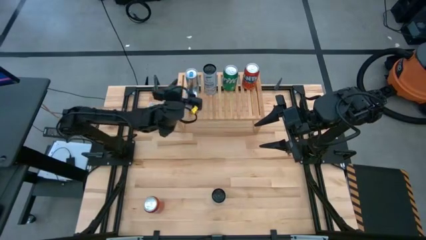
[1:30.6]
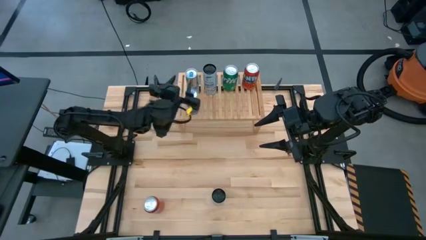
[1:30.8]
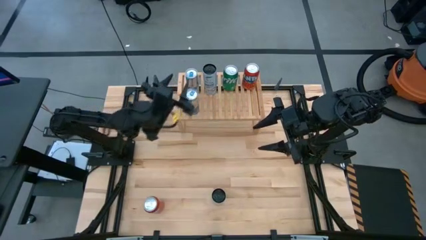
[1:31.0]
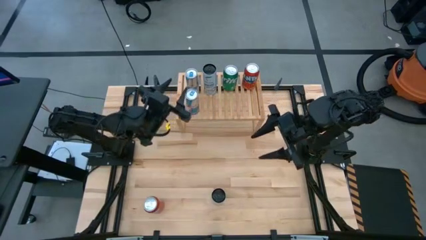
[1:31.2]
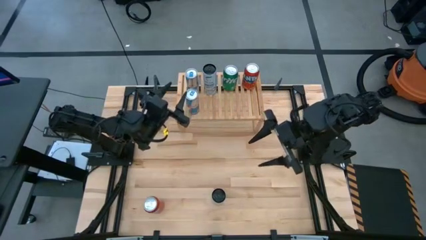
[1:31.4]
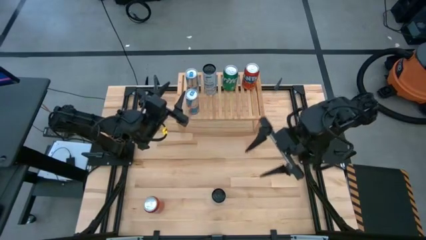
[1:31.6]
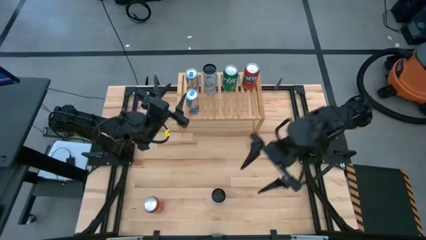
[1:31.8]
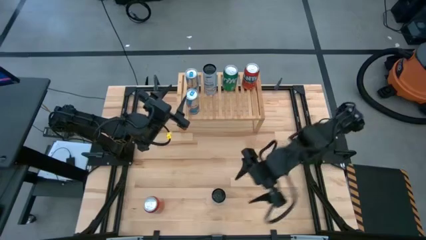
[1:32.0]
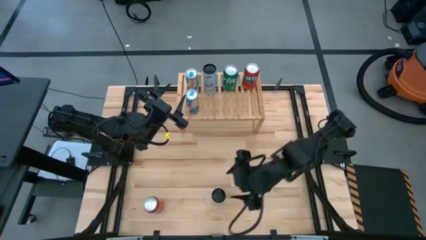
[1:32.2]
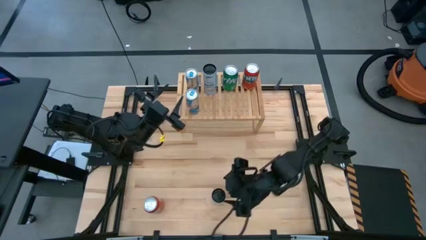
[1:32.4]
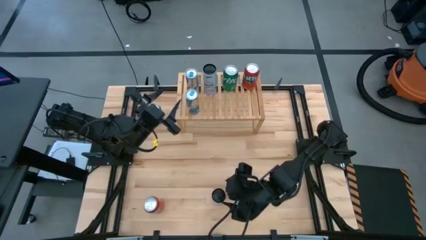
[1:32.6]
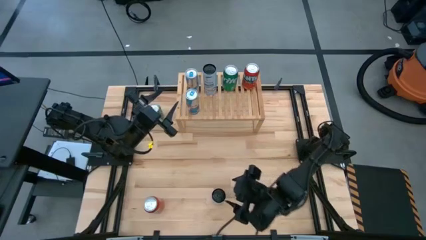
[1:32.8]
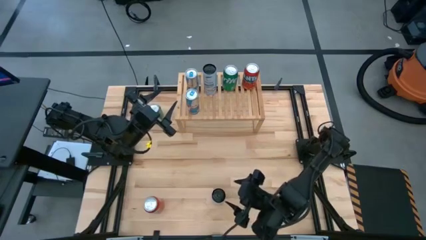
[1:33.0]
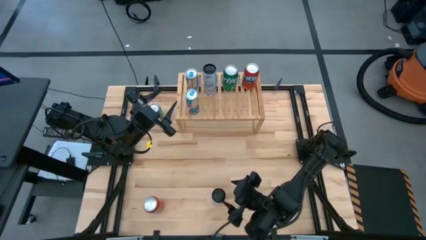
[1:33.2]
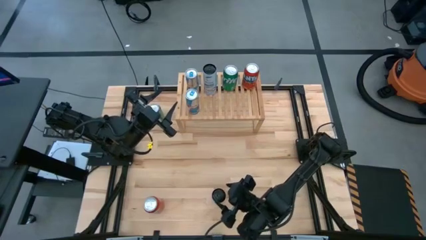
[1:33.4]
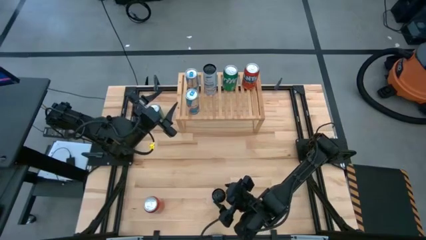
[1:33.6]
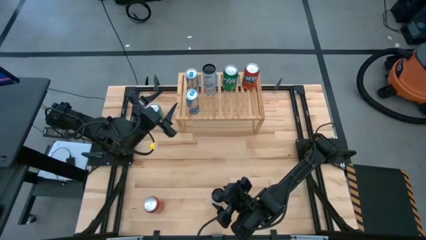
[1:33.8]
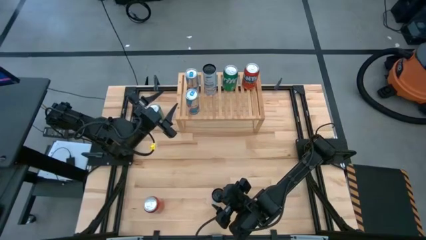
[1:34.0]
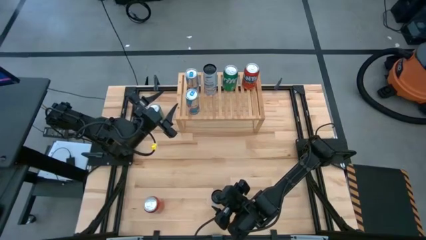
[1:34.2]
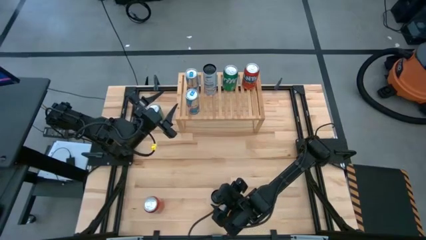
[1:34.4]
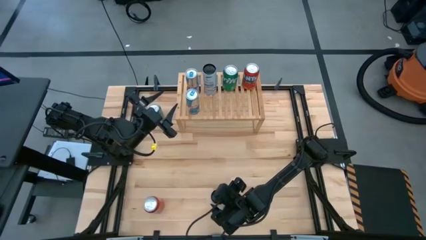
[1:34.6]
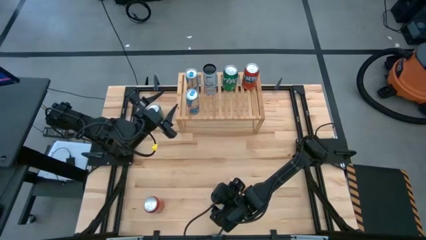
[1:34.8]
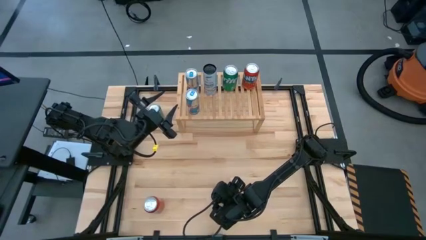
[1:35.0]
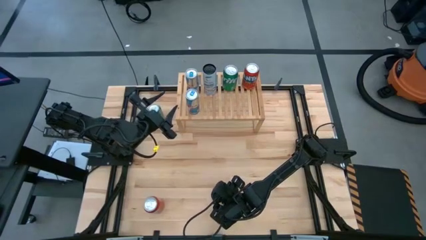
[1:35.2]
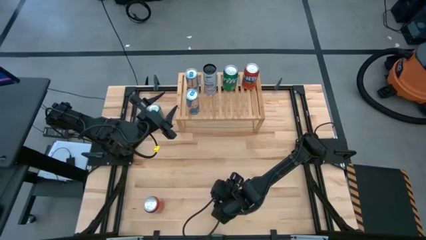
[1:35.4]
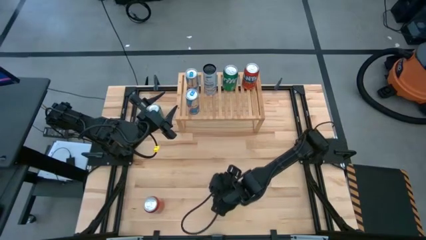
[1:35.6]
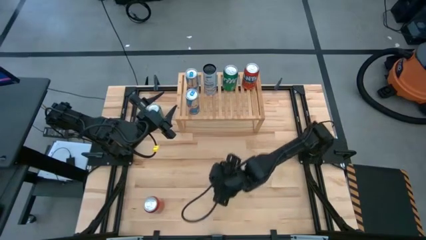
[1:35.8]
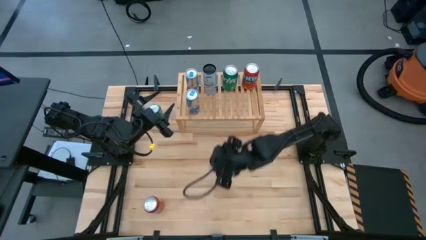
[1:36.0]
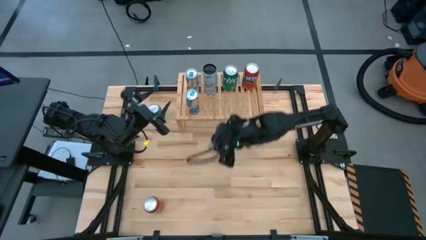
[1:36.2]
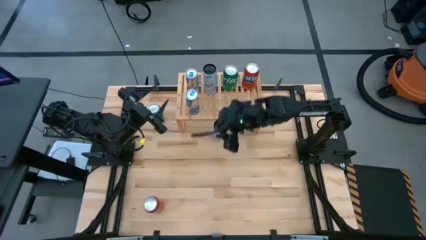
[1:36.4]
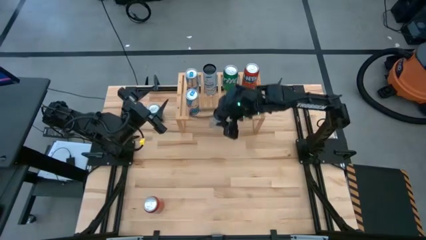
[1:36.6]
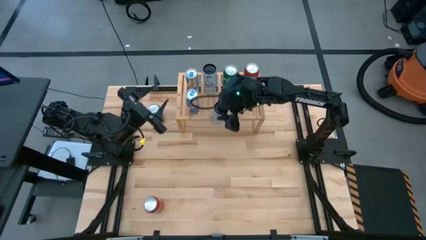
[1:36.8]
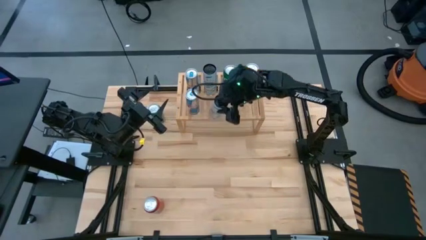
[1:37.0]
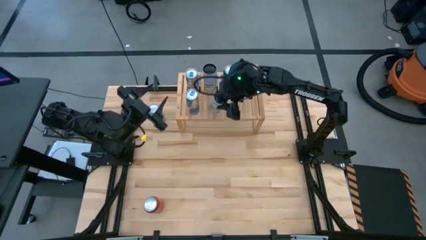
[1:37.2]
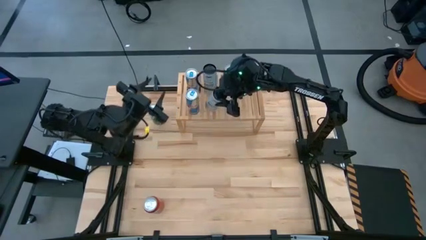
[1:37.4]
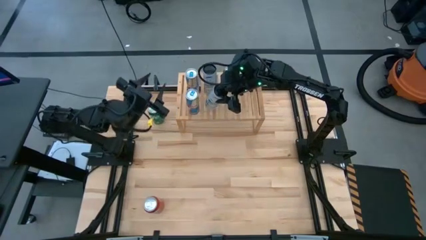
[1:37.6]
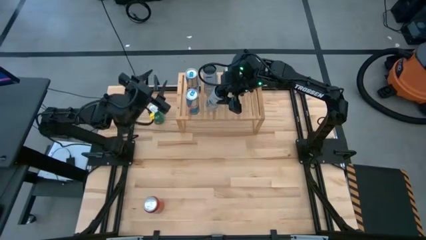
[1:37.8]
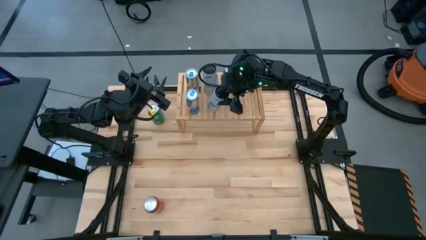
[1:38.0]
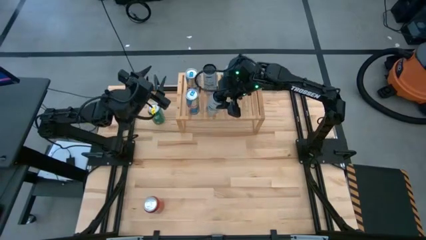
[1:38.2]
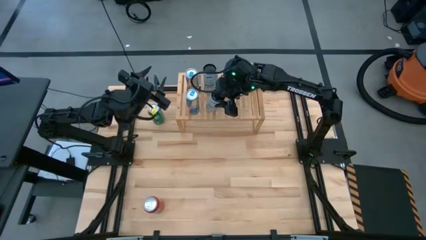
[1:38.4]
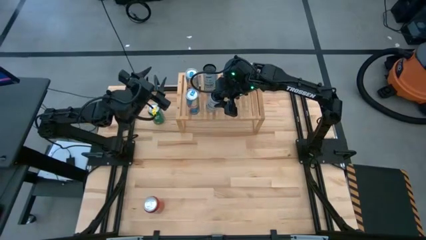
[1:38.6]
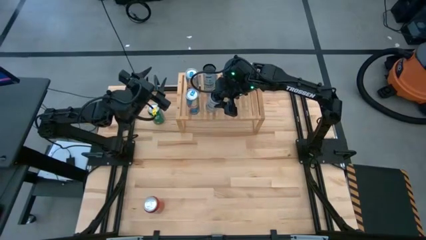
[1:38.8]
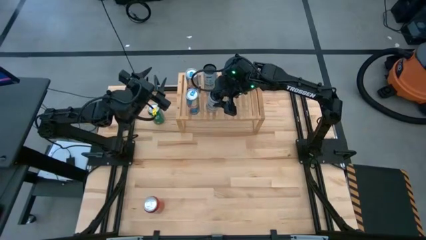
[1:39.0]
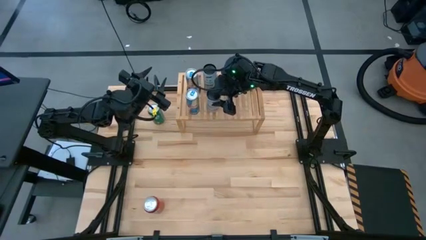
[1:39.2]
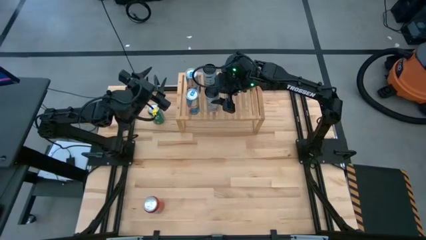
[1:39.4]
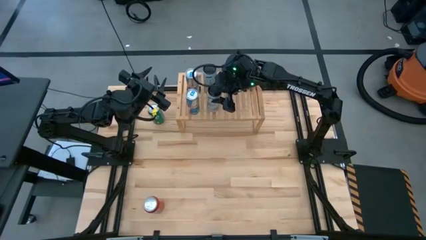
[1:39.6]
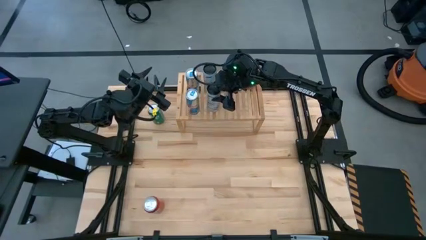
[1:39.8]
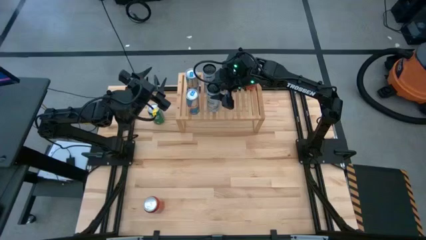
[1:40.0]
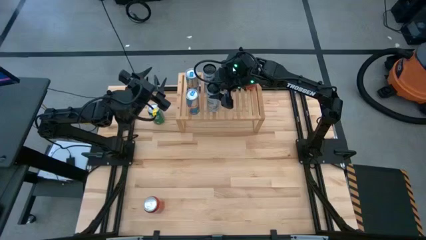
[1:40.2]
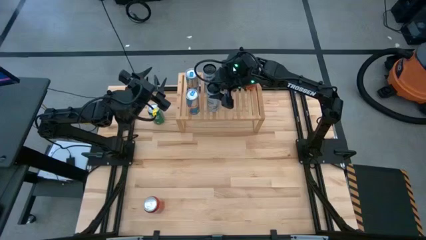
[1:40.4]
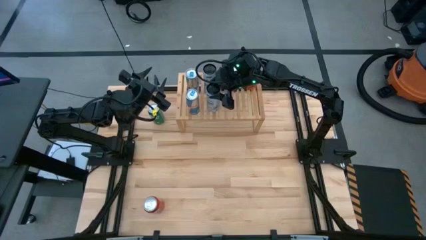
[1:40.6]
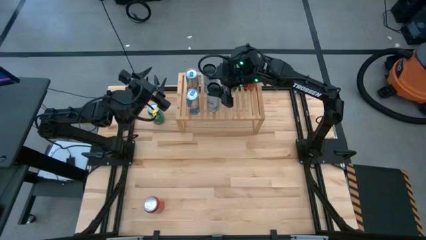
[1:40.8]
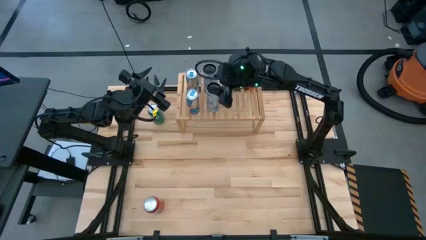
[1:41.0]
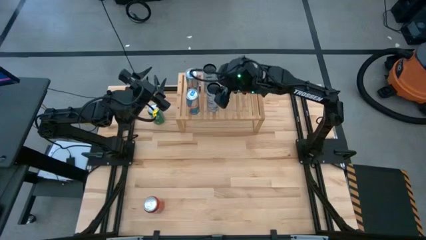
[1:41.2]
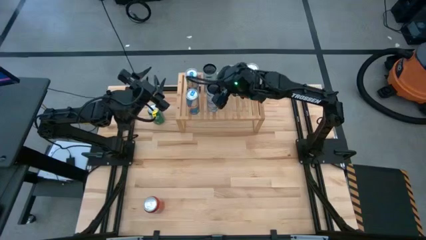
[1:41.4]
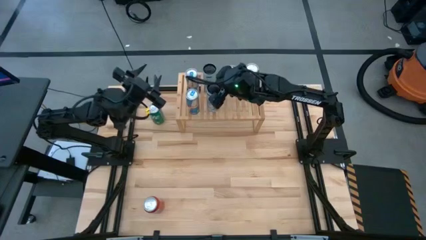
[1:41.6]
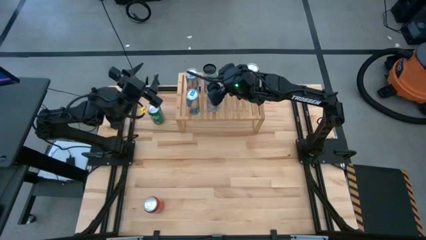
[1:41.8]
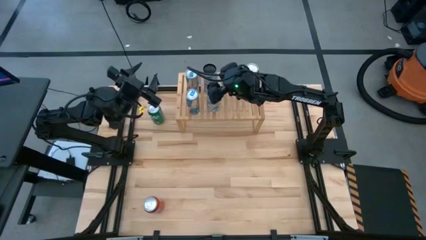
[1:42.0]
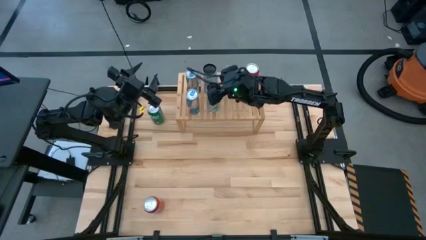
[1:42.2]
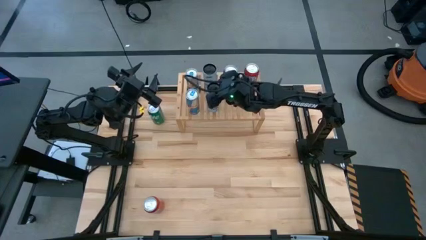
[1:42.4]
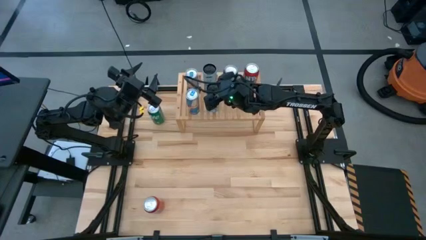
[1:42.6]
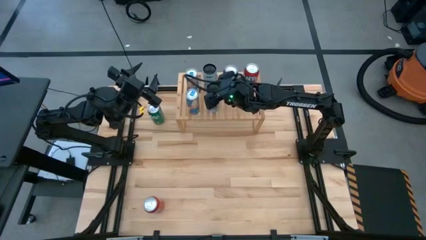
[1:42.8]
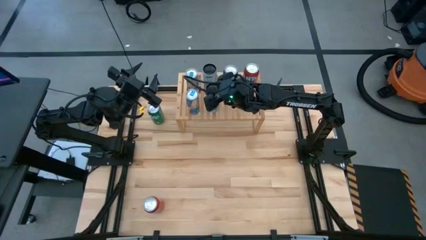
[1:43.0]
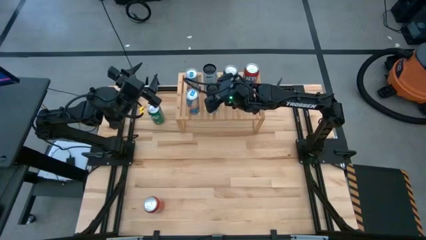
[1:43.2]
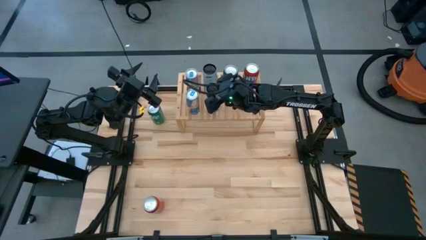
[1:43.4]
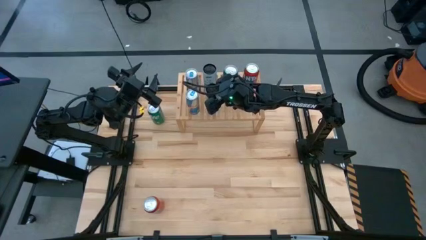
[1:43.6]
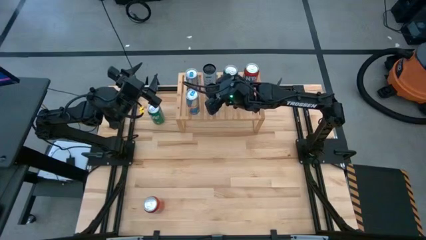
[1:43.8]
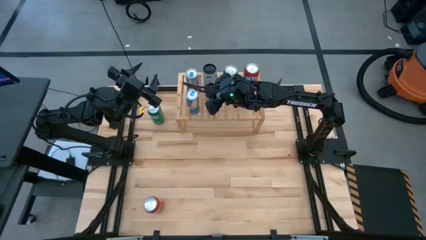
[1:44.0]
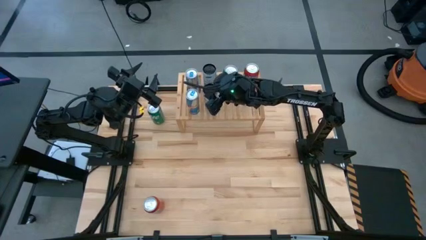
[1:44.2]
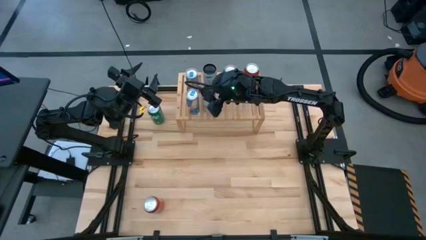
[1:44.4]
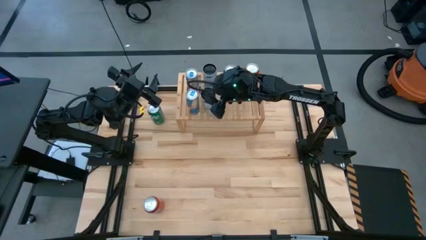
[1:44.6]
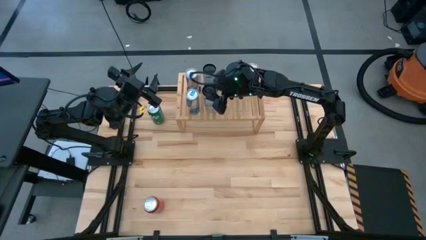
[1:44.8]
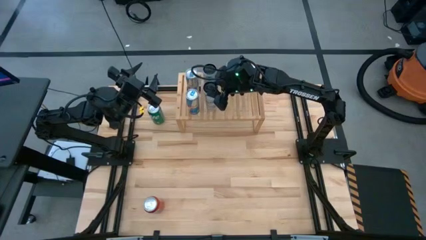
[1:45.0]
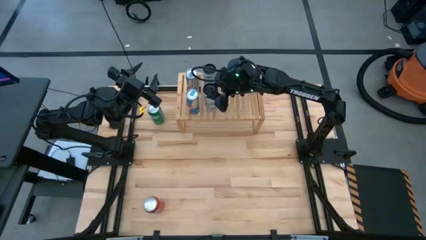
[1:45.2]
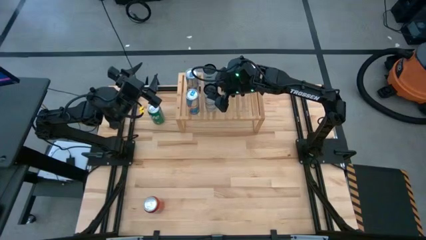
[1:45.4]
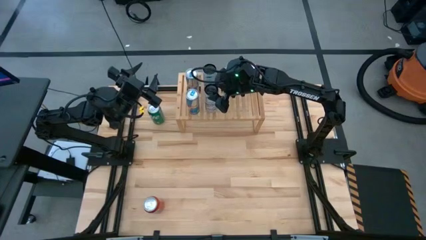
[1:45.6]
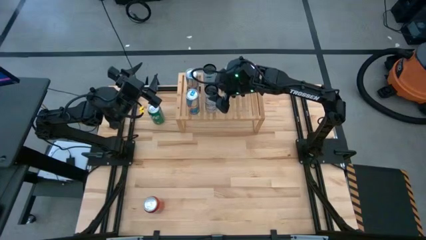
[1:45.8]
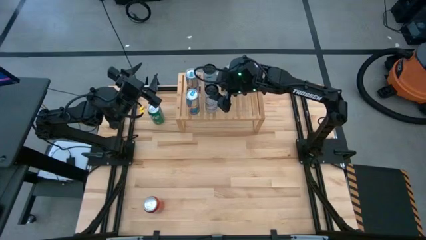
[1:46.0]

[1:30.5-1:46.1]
Task: Place canned beverage on shelf
Put the white blue soda can aligned with the other white blue soda can on the shelf
